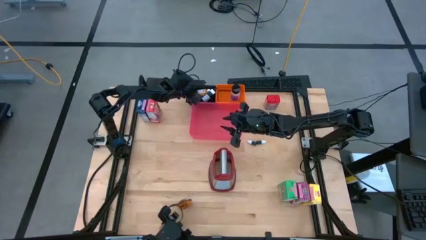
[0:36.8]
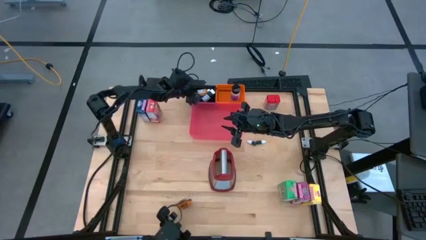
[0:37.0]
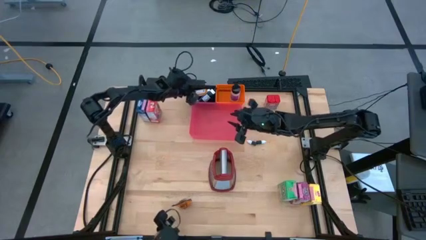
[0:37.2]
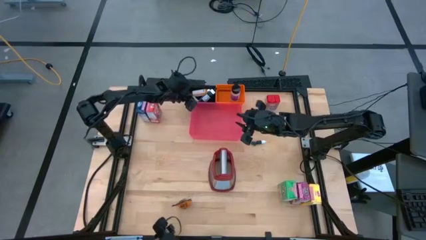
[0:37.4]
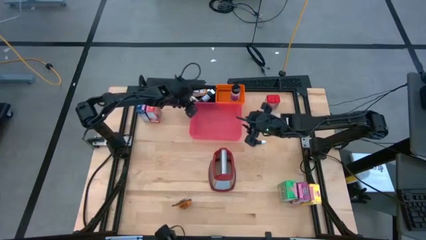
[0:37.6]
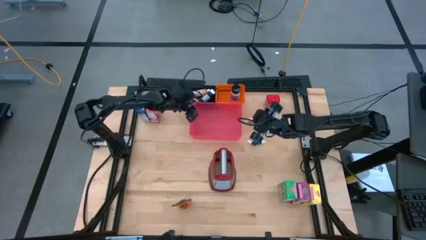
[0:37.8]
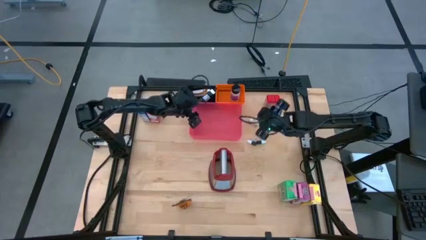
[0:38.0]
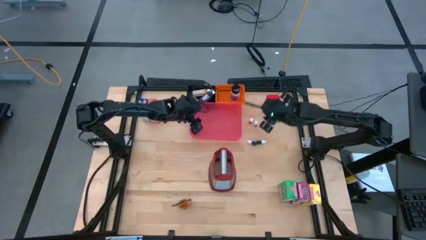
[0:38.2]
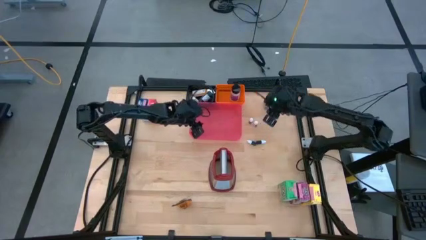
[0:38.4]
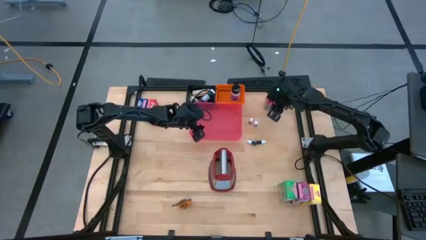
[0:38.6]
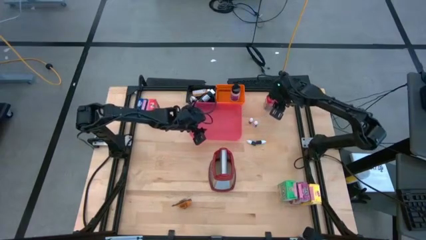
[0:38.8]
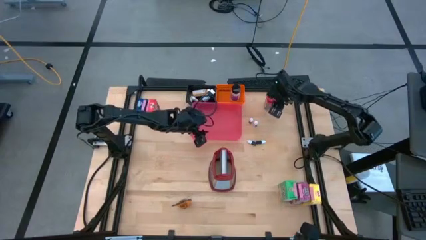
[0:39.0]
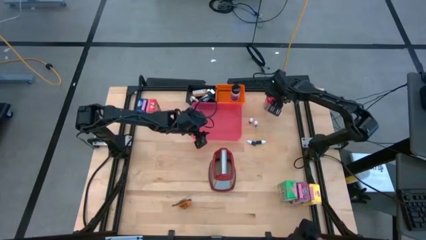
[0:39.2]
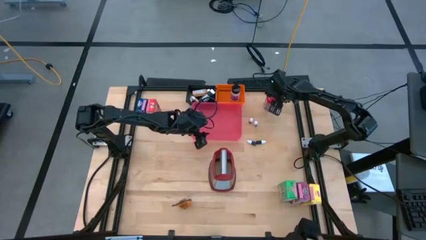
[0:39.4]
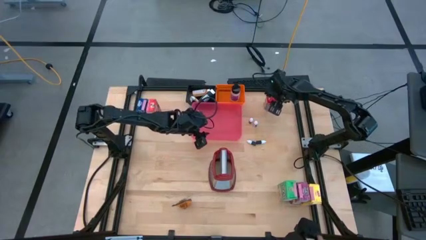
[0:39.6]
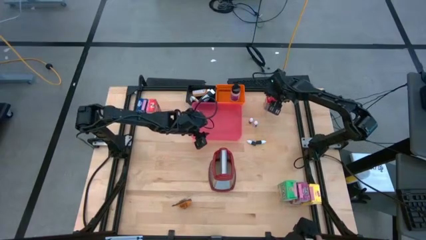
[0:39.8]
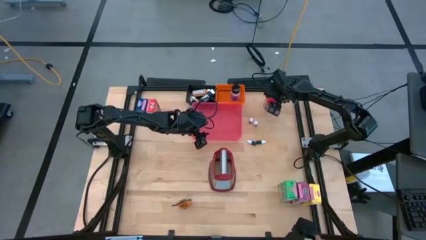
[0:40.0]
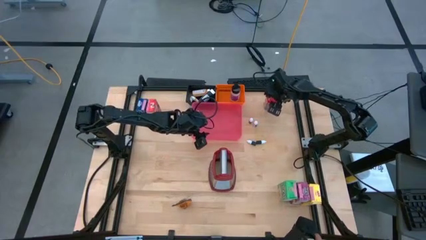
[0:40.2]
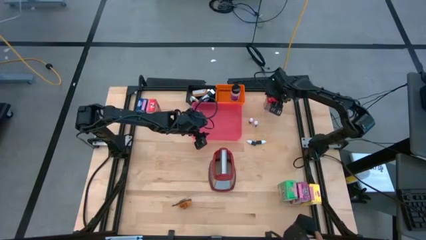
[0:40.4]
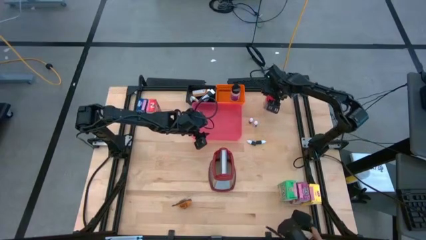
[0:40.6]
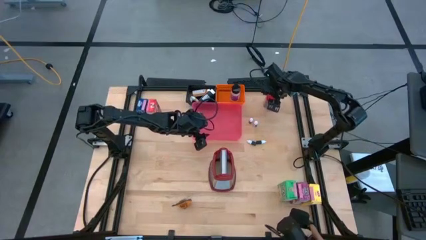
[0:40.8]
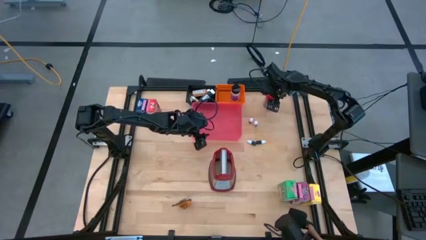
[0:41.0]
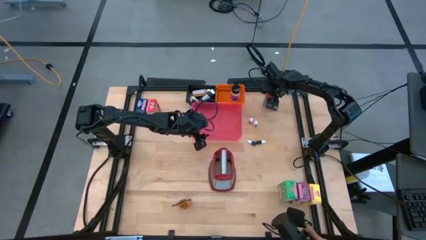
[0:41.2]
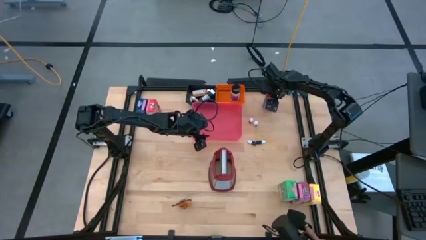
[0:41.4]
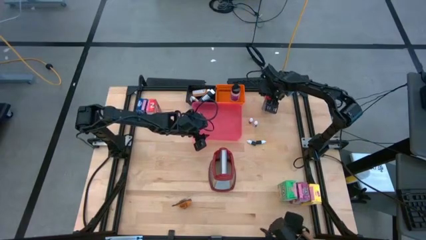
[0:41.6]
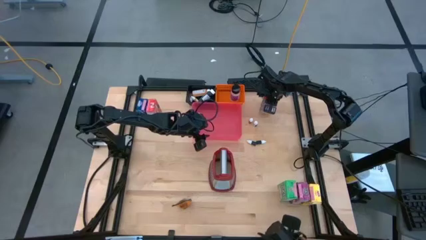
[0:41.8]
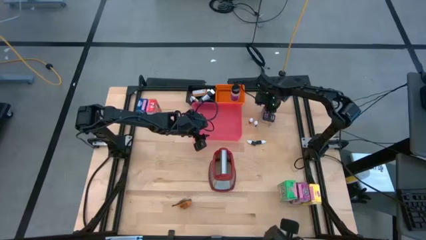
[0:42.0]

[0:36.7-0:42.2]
Task: Pick & Place Kitchen Items
Put the red seasoning can into the orange basket

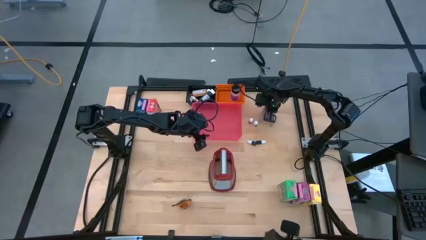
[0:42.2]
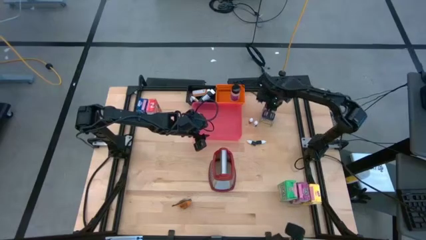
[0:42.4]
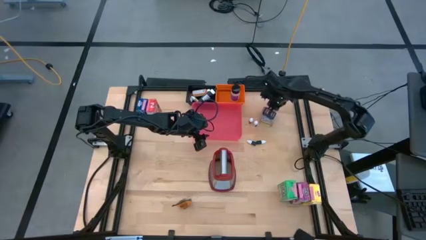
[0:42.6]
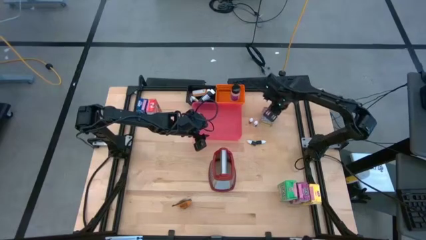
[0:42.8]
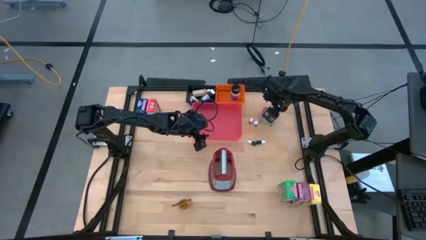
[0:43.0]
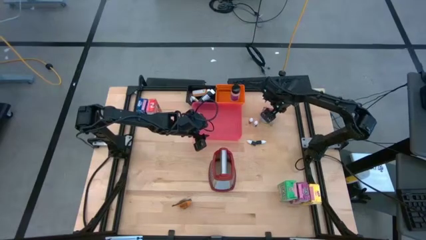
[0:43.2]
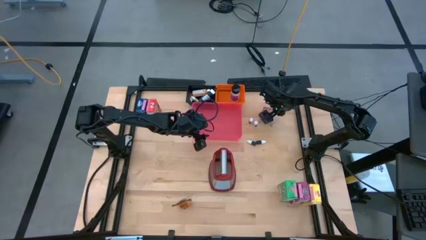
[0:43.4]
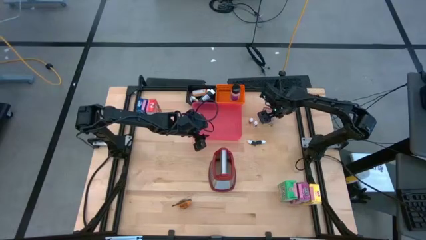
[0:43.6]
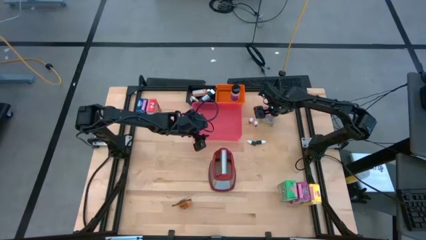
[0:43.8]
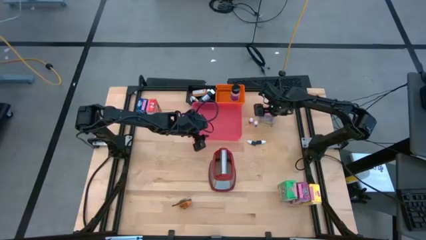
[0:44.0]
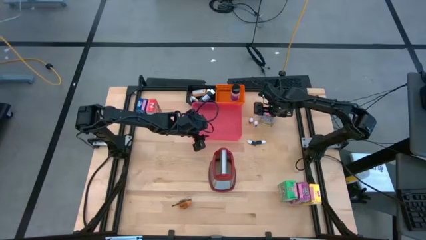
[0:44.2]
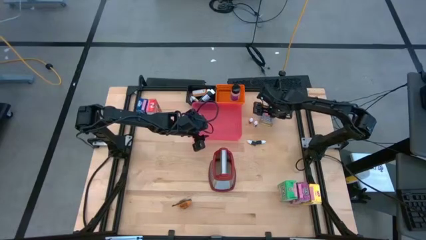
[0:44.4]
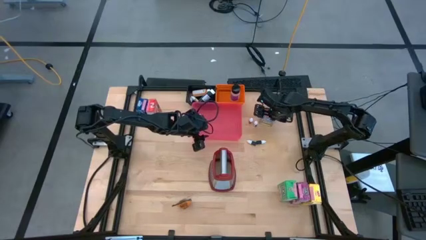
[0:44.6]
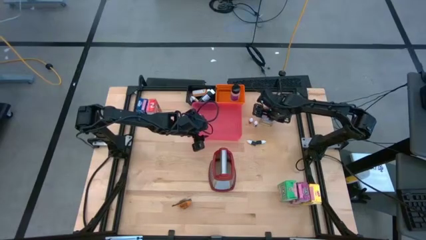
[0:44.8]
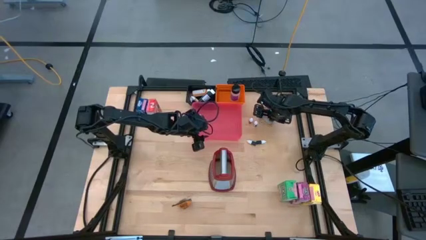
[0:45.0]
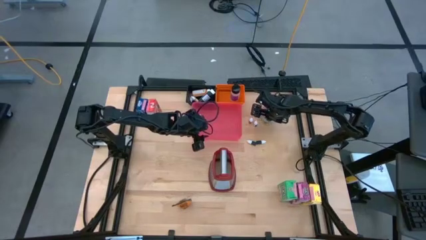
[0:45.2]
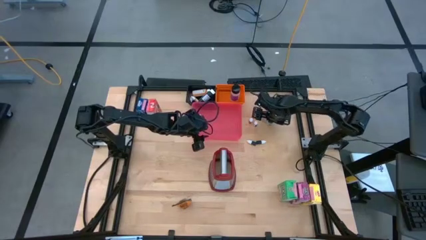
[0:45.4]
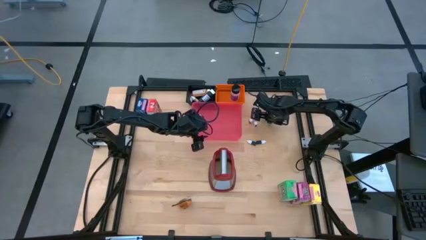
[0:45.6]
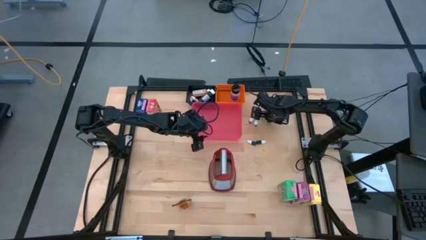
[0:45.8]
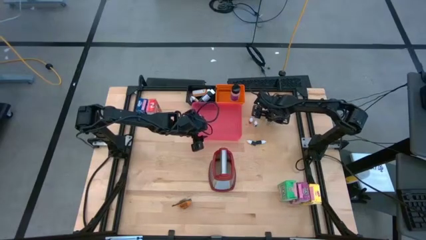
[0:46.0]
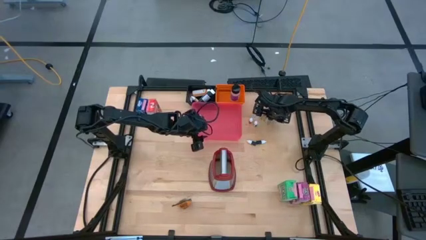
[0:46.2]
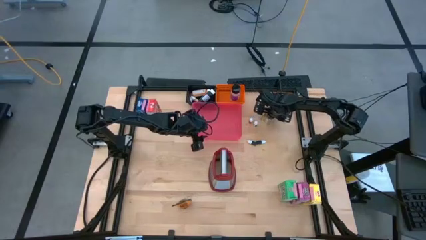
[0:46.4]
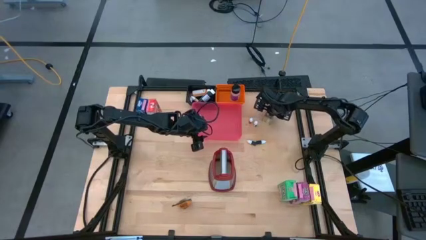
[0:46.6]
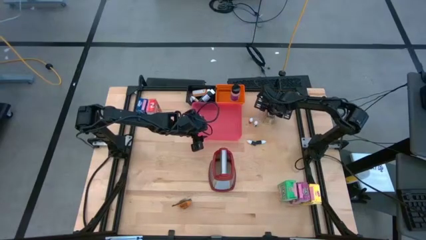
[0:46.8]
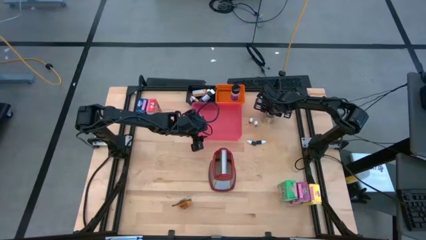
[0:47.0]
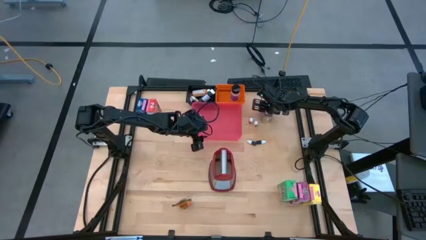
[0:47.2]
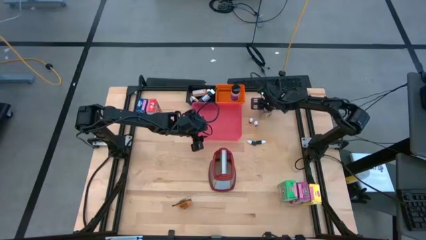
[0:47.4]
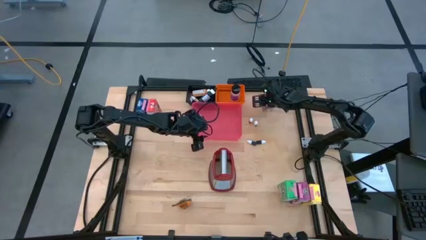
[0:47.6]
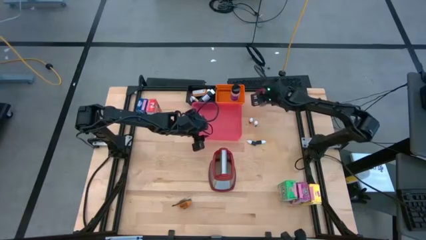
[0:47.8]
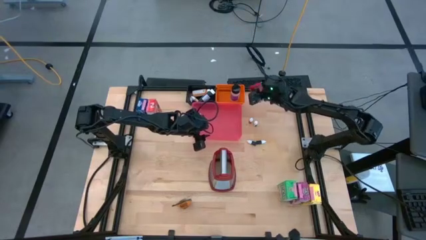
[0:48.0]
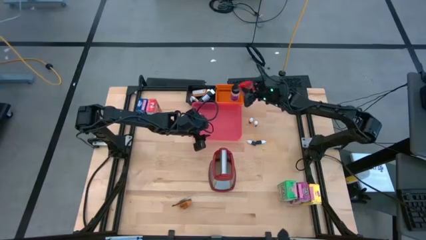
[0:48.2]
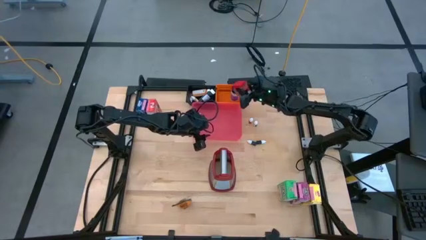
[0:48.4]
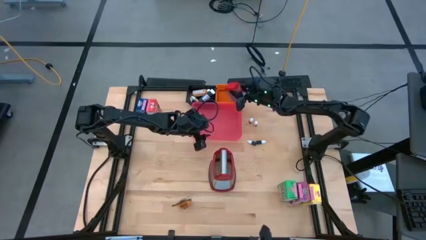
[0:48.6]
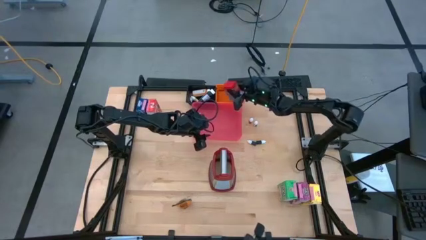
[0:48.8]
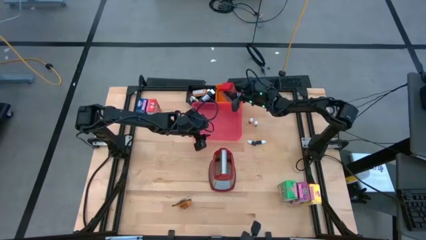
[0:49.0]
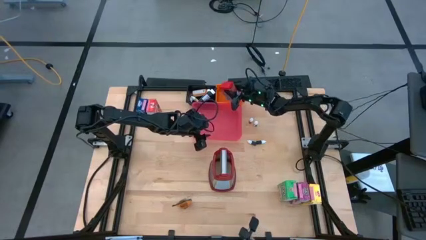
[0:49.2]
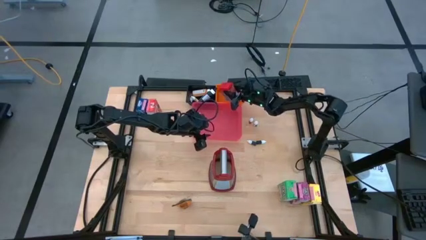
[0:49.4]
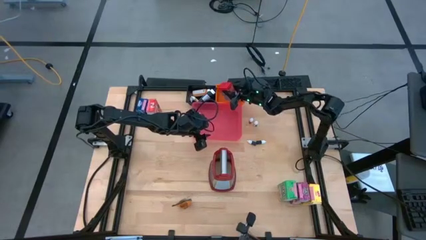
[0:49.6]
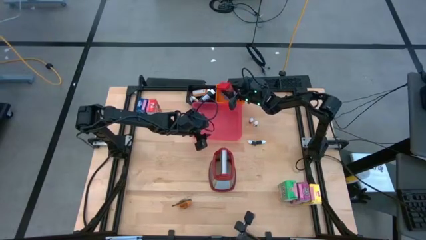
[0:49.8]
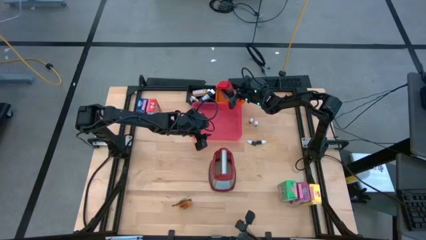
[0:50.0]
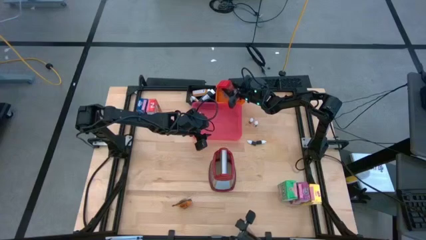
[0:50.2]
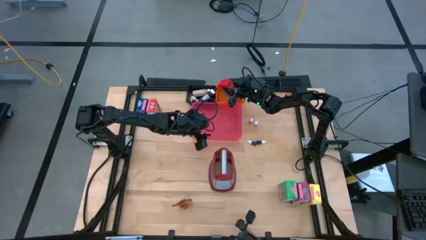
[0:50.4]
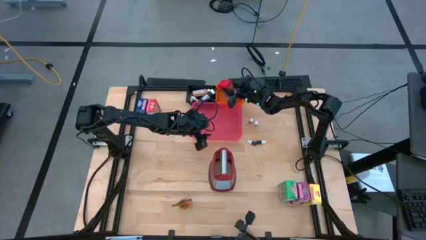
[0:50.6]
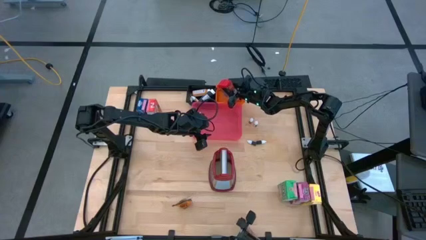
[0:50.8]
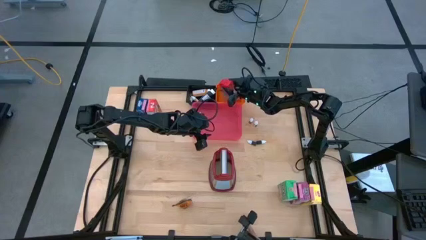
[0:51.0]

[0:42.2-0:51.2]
Put the red seasoning can into the orange basket

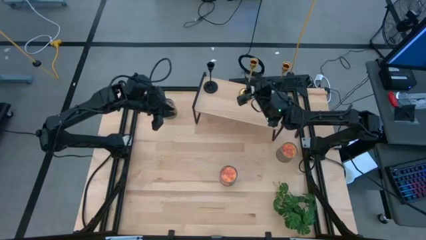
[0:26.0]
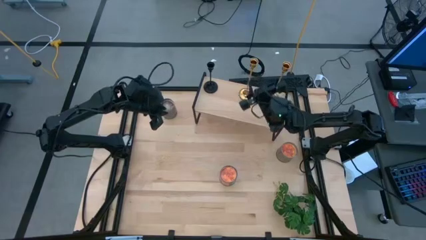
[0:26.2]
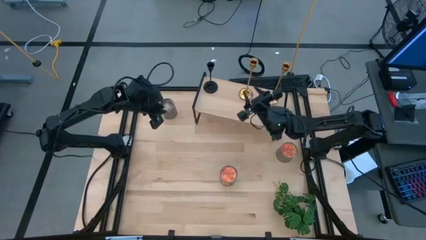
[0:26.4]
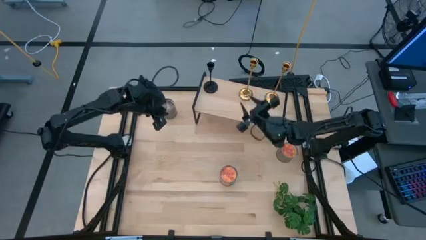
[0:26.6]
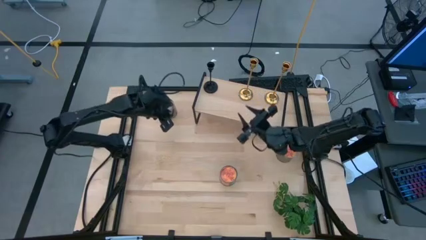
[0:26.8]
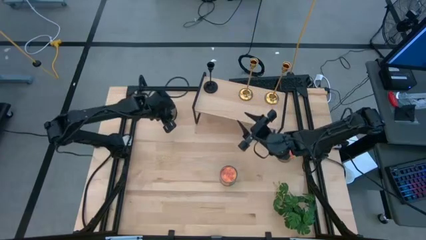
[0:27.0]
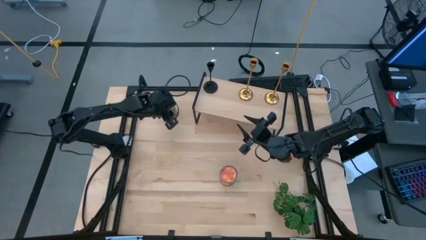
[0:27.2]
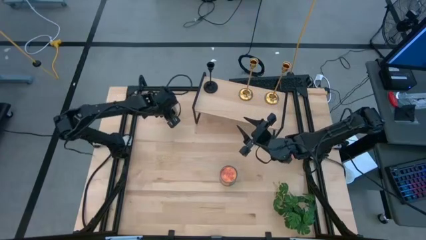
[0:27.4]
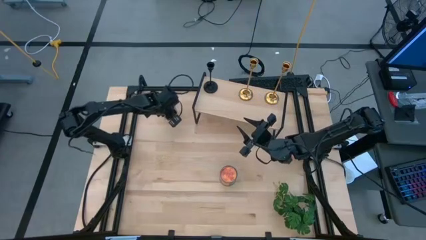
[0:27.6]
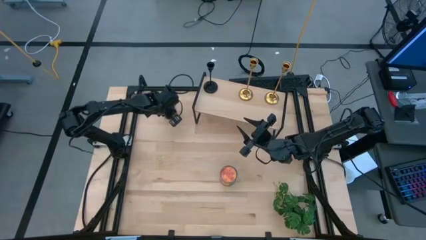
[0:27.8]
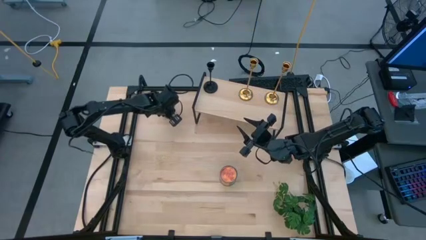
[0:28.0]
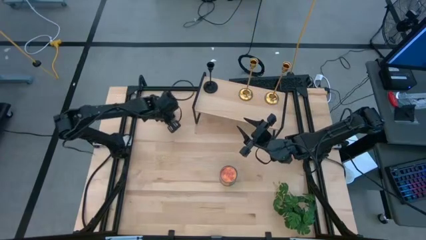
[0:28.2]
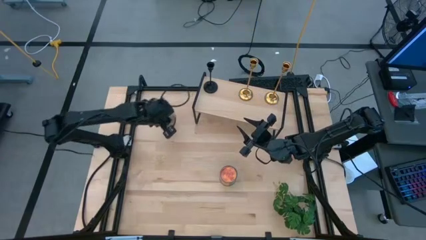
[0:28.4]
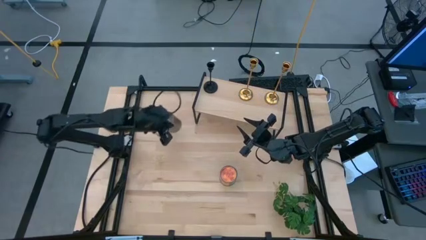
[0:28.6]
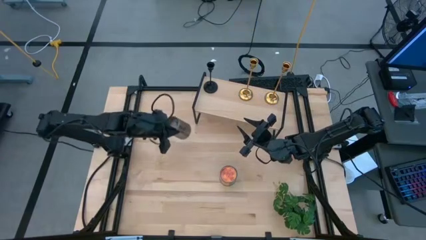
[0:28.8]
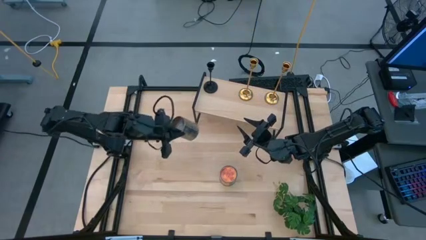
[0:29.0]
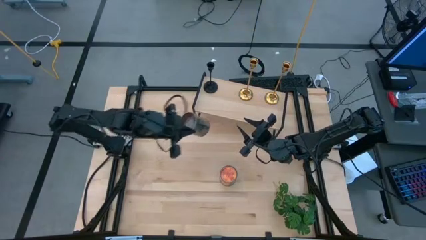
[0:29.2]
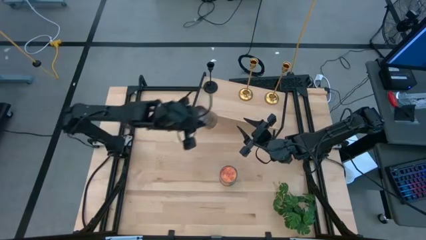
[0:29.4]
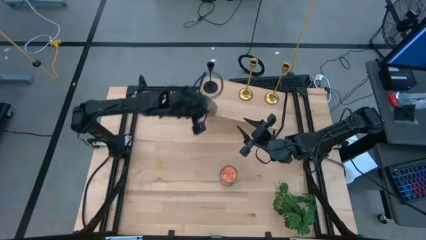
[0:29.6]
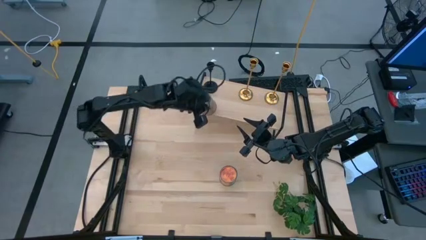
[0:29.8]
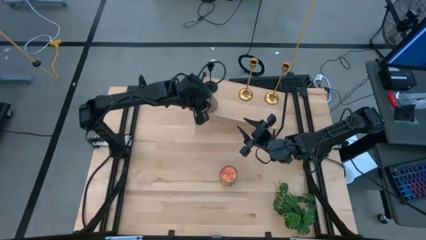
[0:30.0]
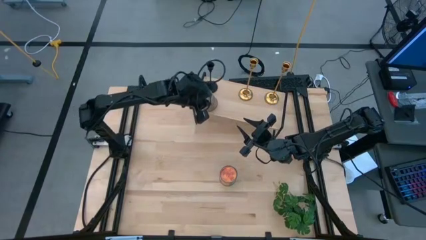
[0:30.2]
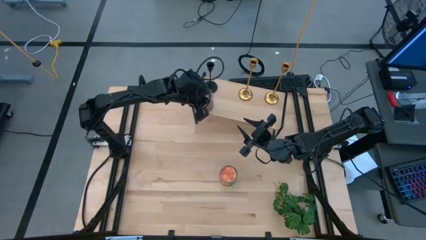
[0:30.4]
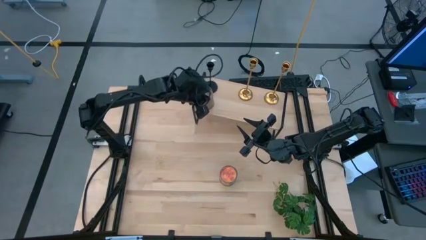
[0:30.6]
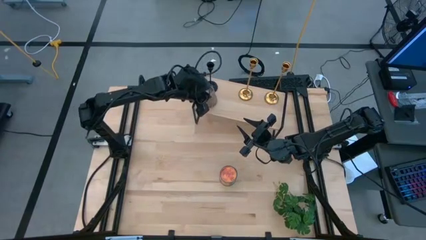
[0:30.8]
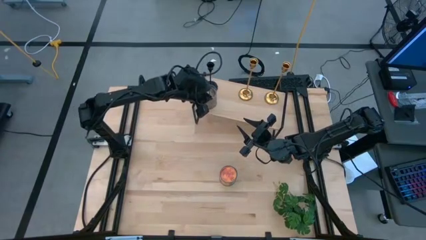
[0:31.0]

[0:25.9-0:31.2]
Task: Pick & Place candle stick holders
Put the brown scented candle on the shelf
